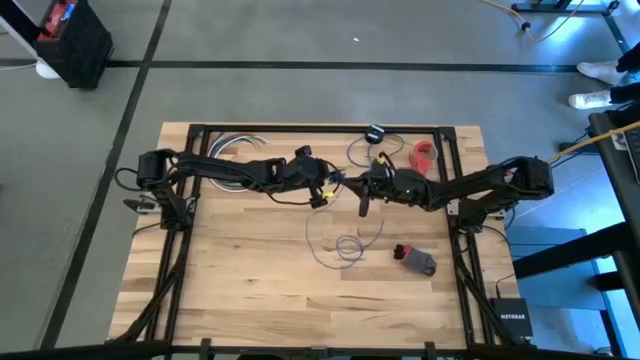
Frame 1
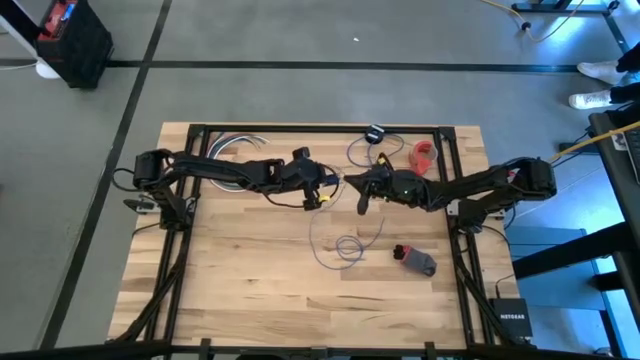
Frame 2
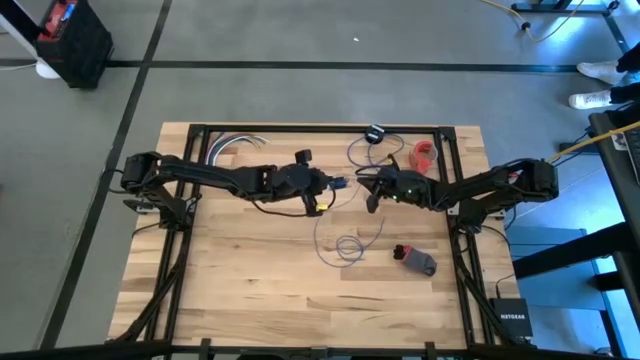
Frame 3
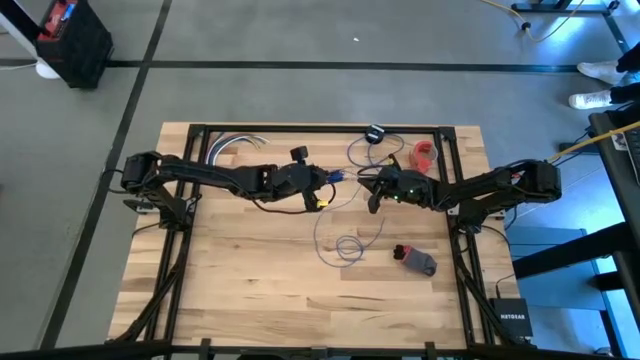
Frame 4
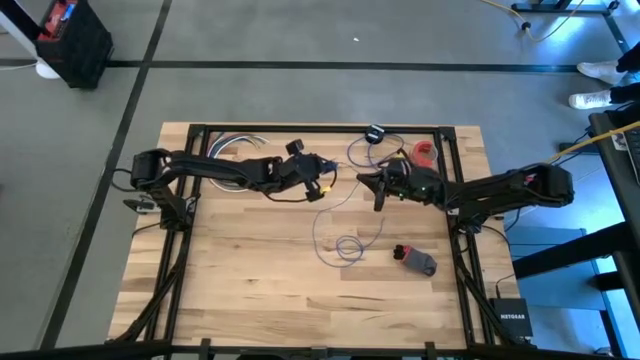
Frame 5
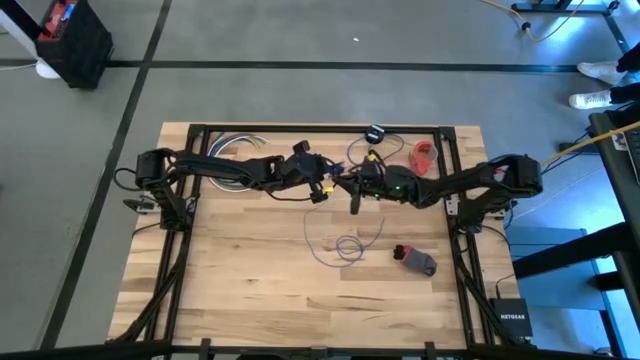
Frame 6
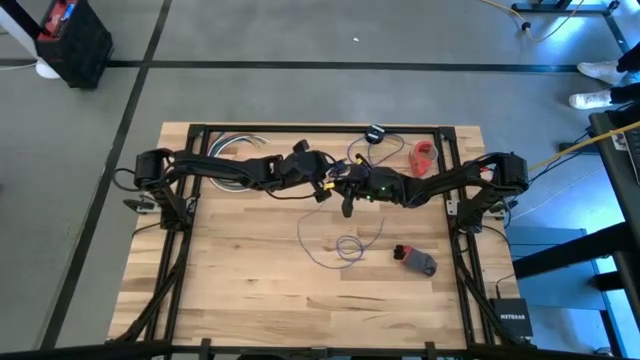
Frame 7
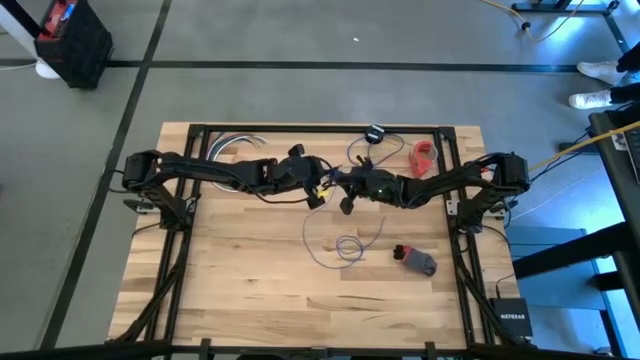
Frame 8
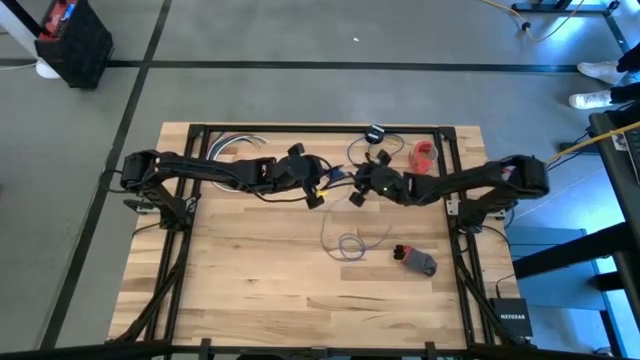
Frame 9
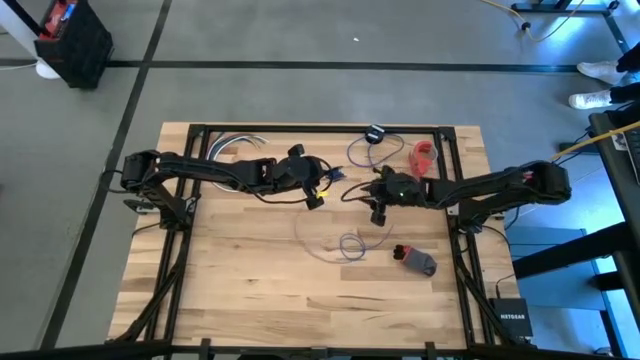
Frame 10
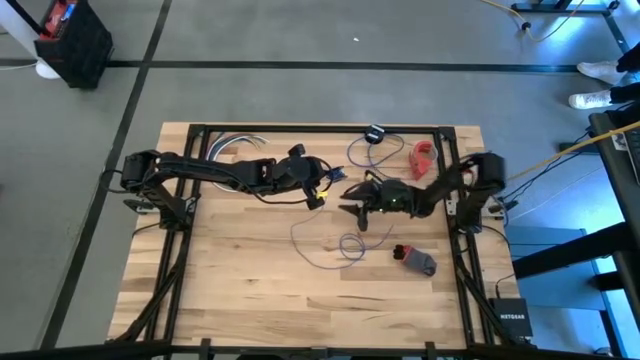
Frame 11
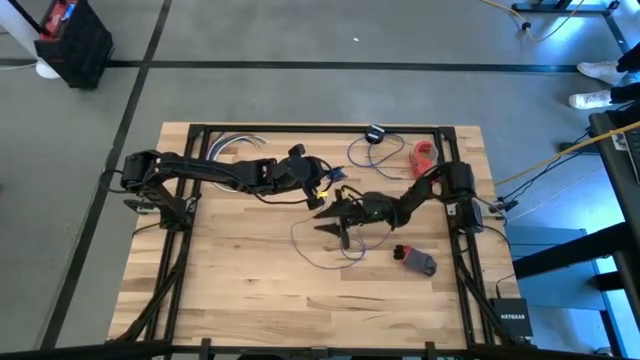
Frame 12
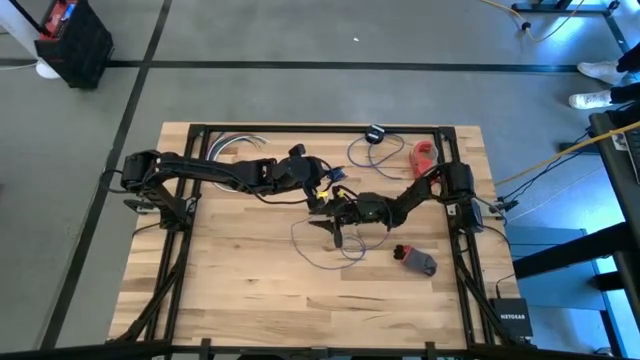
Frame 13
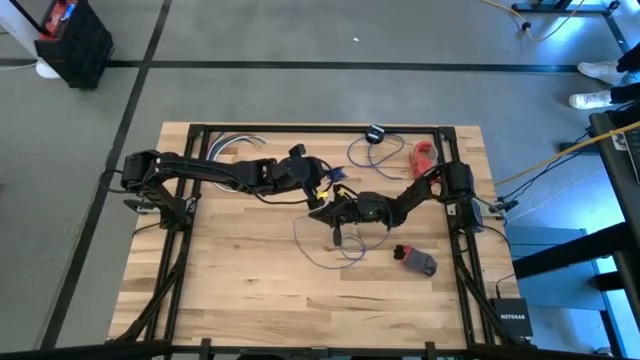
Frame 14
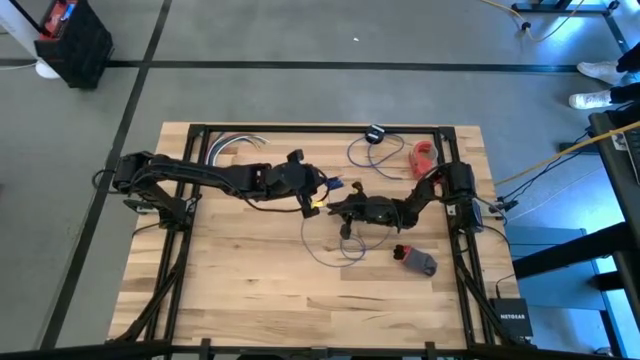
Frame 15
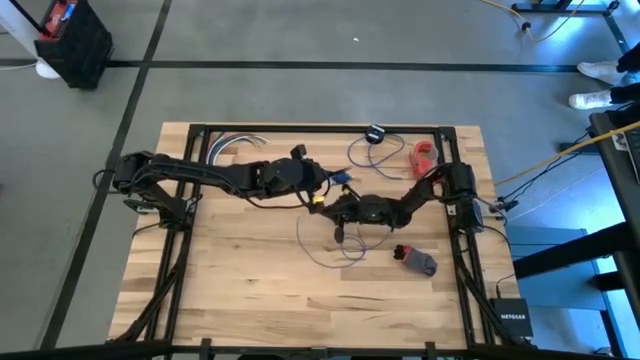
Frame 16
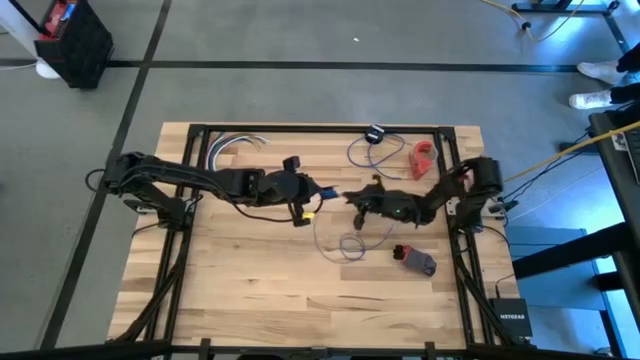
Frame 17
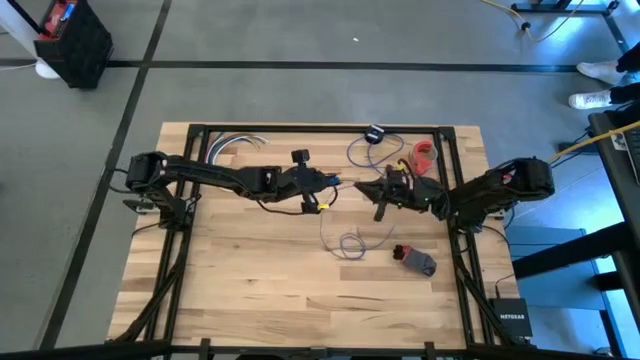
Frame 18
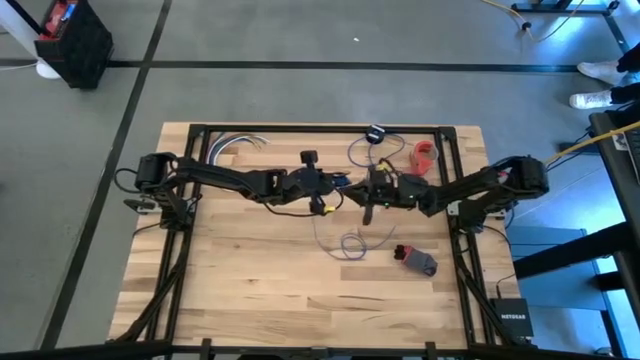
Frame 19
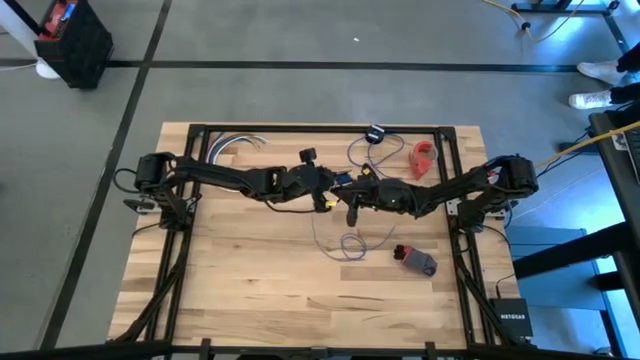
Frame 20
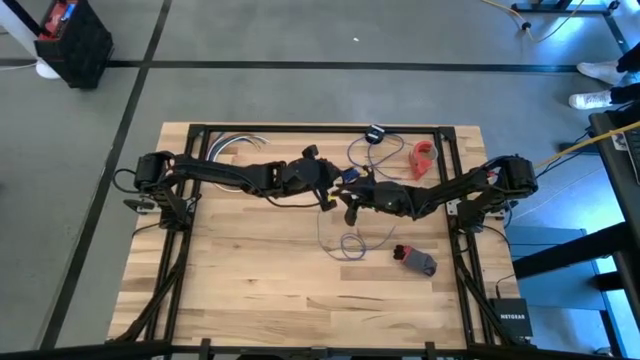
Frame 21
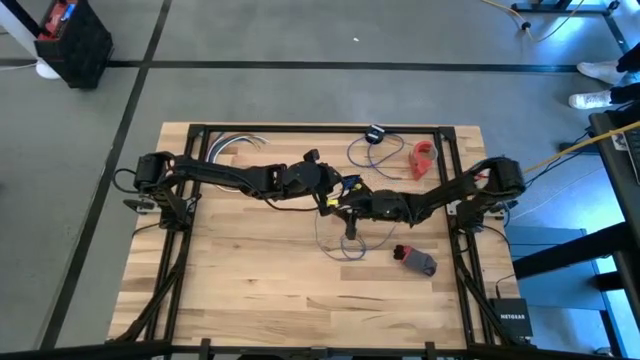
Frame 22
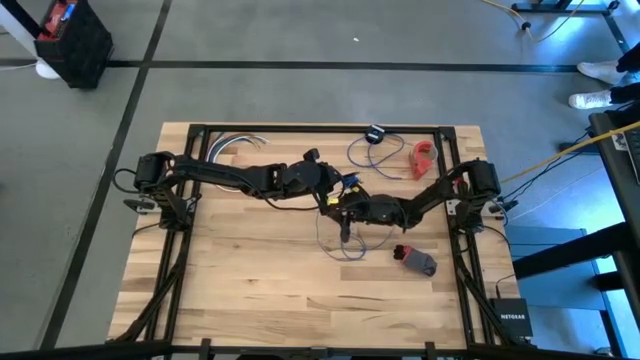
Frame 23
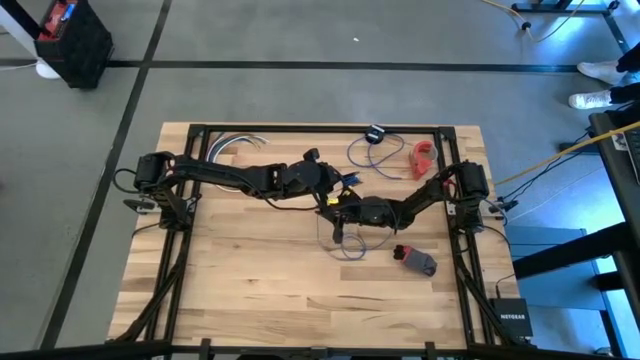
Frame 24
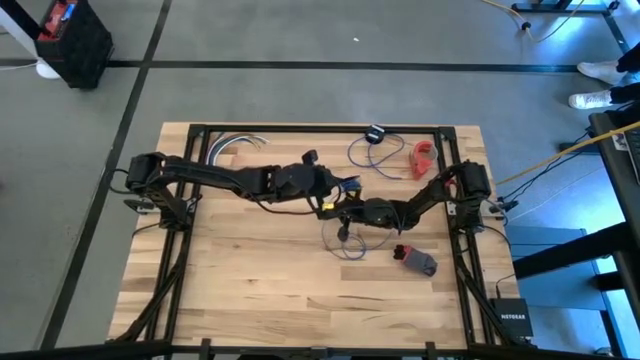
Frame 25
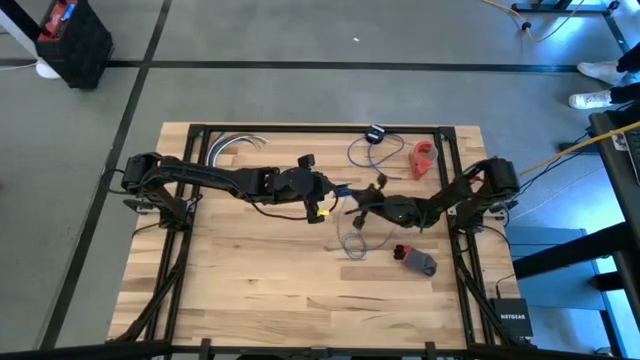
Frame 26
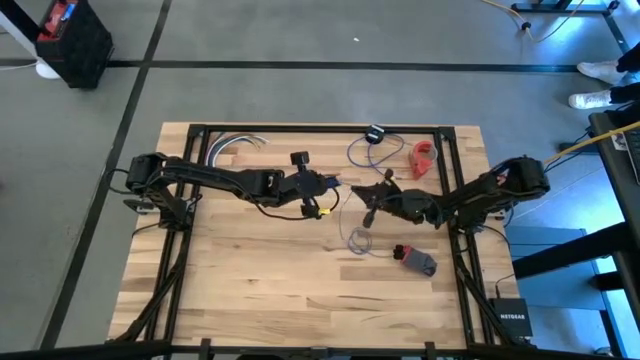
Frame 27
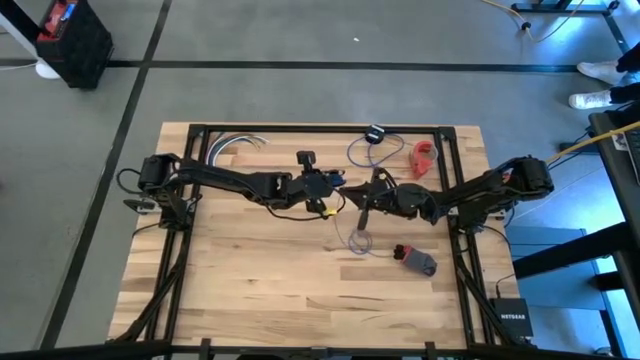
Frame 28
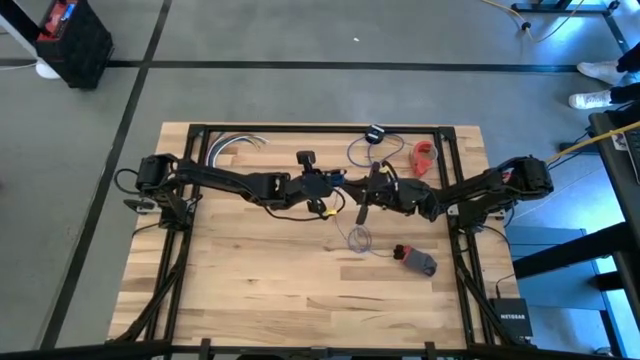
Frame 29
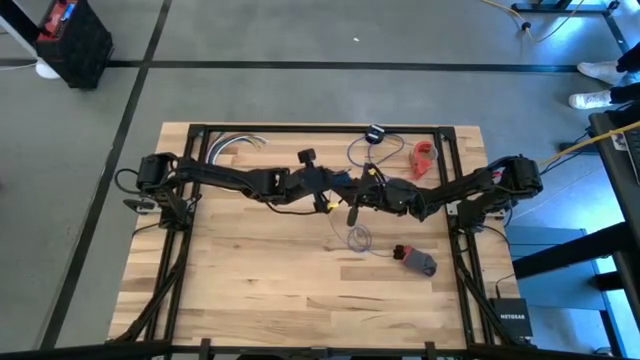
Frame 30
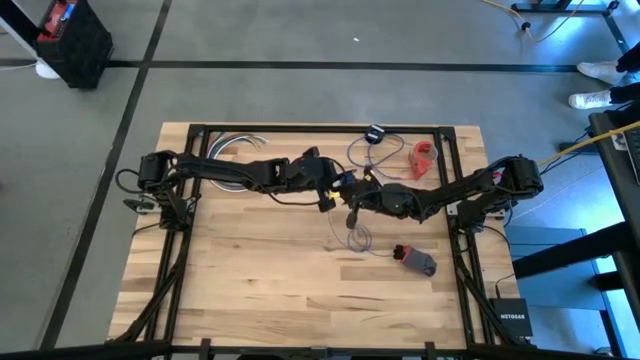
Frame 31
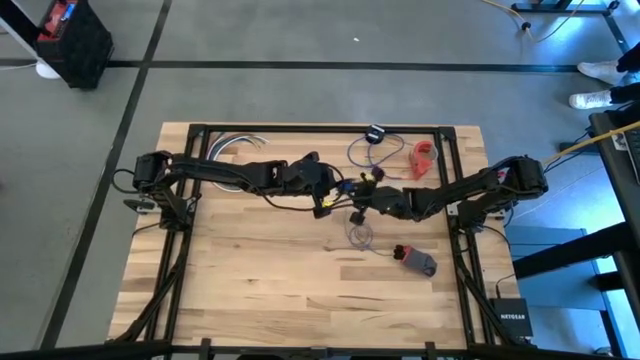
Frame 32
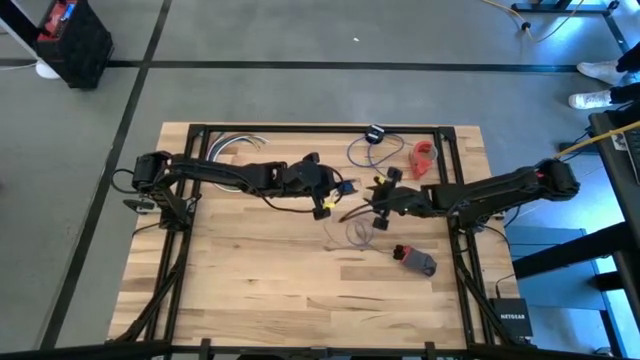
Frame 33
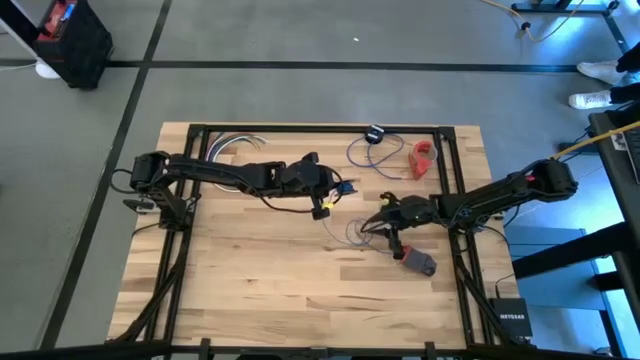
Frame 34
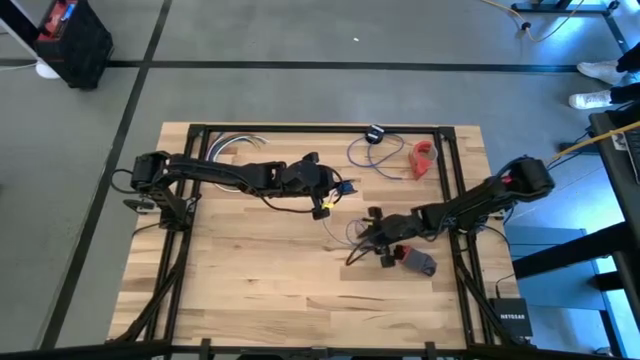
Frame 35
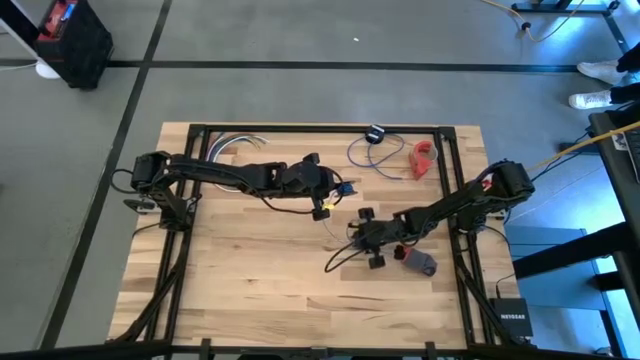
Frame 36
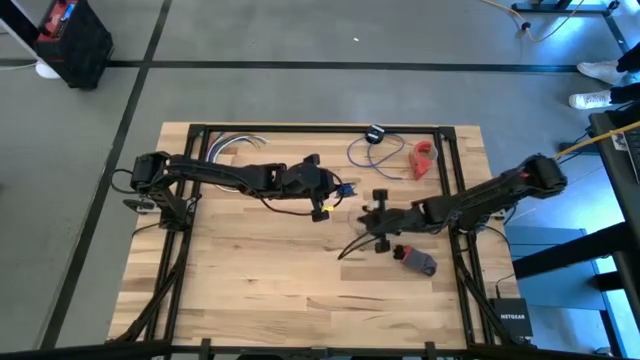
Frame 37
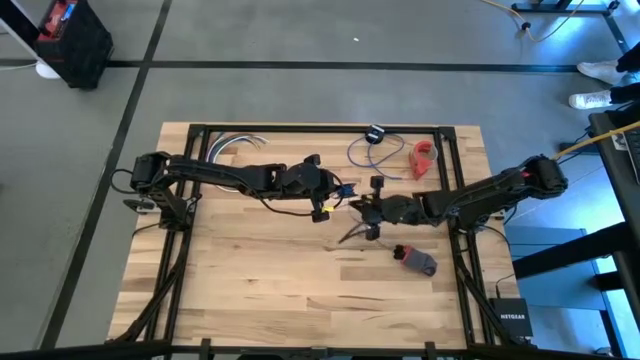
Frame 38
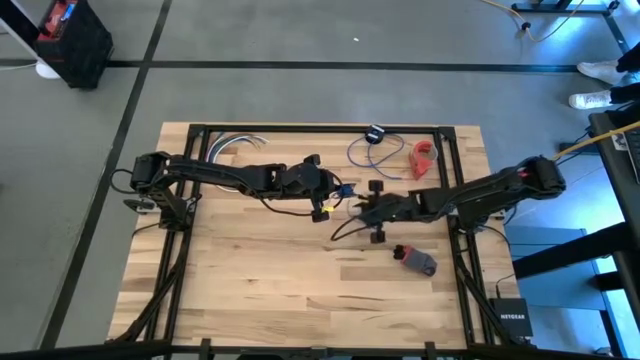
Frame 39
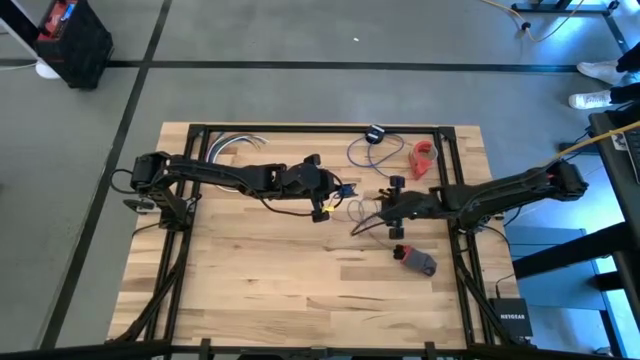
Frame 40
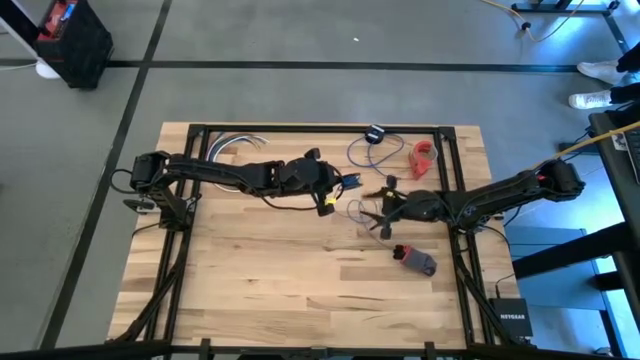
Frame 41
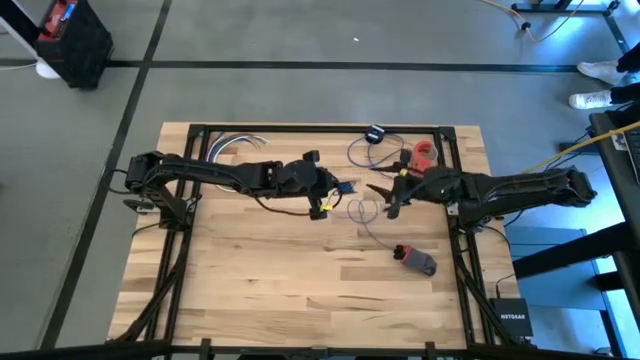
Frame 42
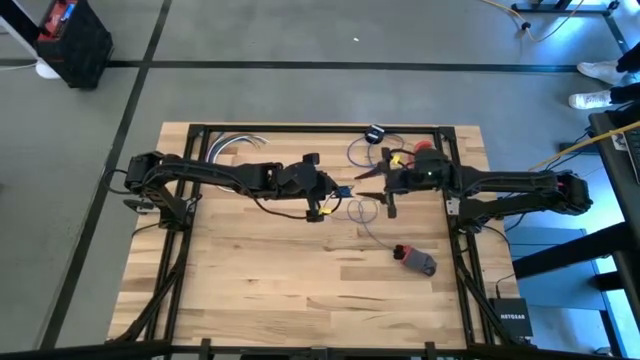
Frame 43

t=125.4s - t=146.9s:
Task: Coil cords
Coil the blue wire onto the spool
